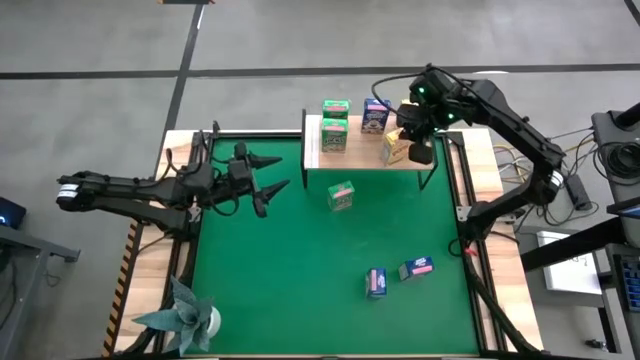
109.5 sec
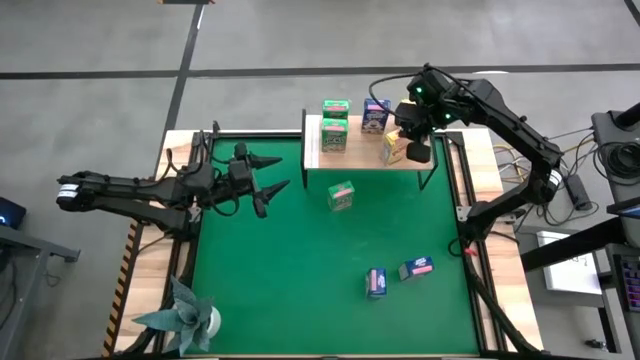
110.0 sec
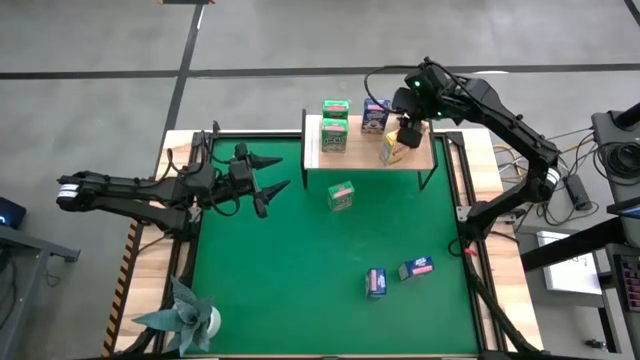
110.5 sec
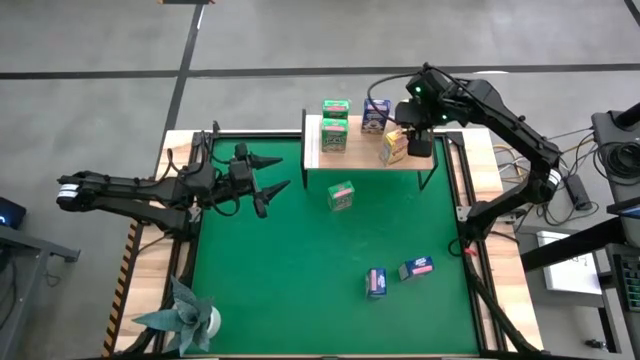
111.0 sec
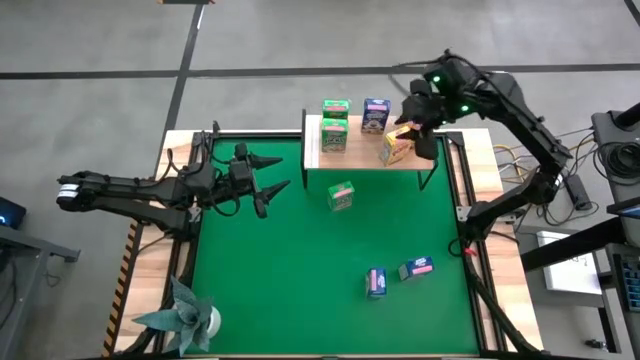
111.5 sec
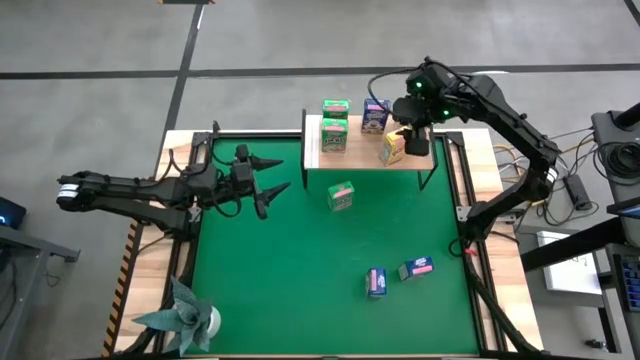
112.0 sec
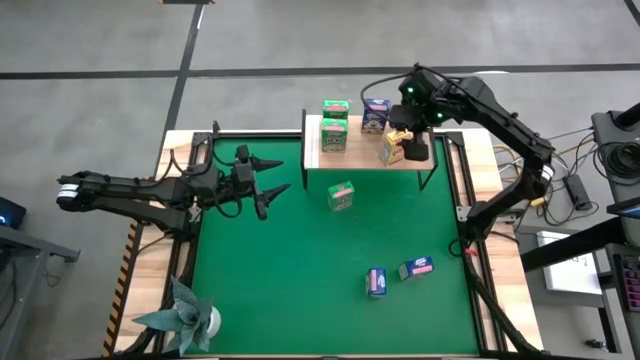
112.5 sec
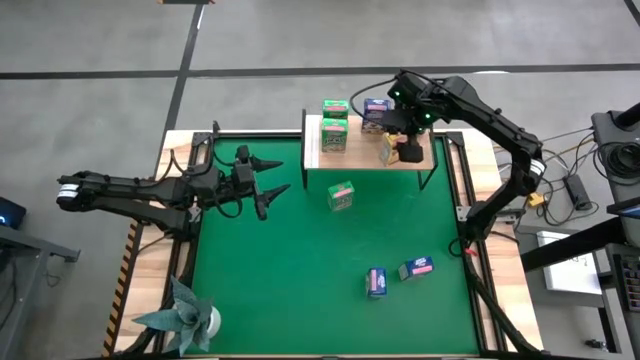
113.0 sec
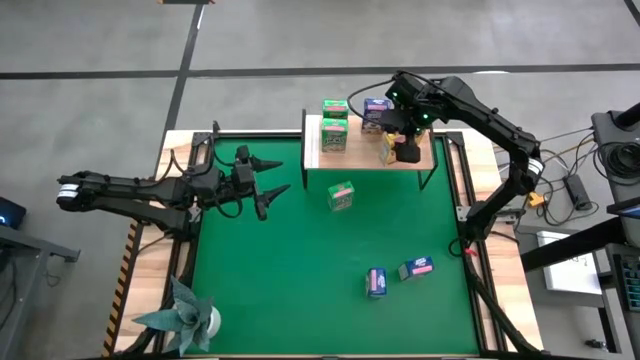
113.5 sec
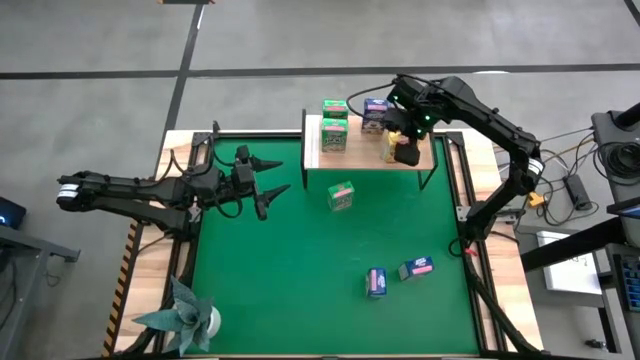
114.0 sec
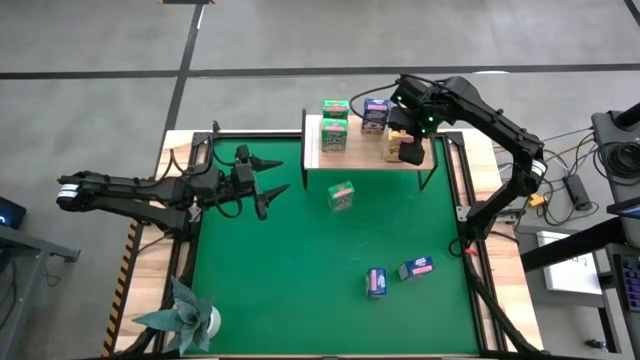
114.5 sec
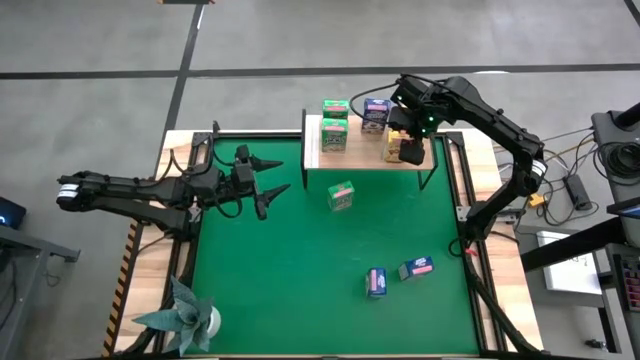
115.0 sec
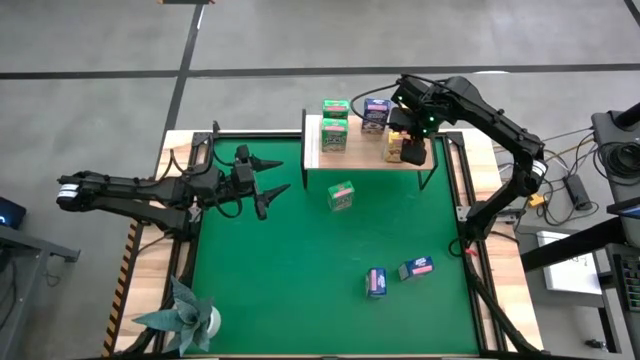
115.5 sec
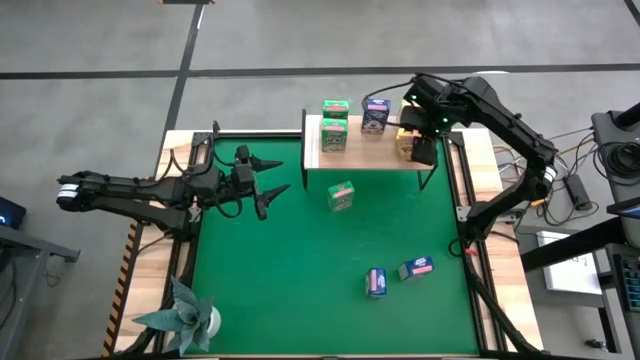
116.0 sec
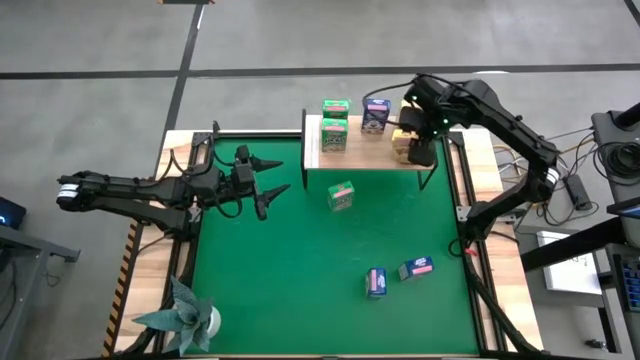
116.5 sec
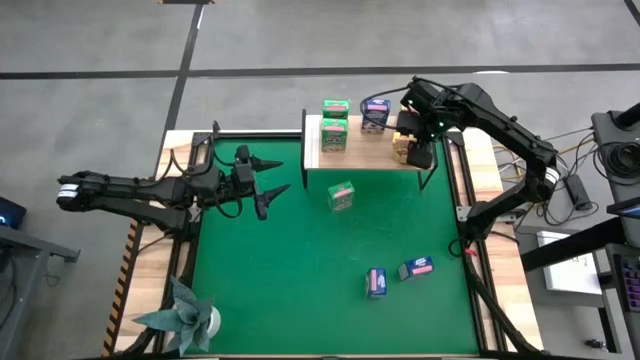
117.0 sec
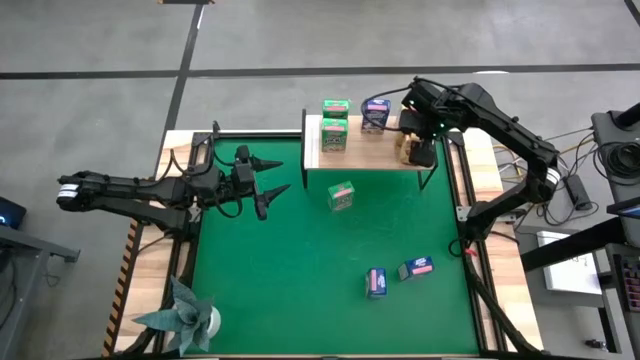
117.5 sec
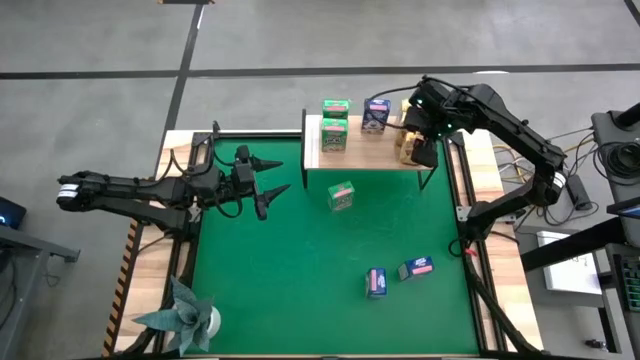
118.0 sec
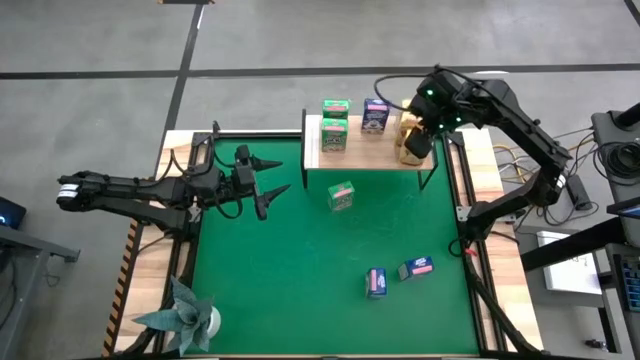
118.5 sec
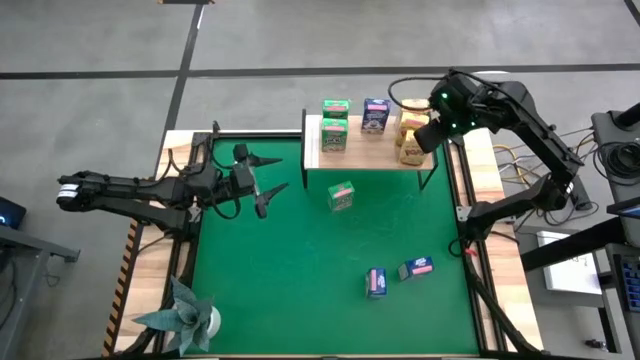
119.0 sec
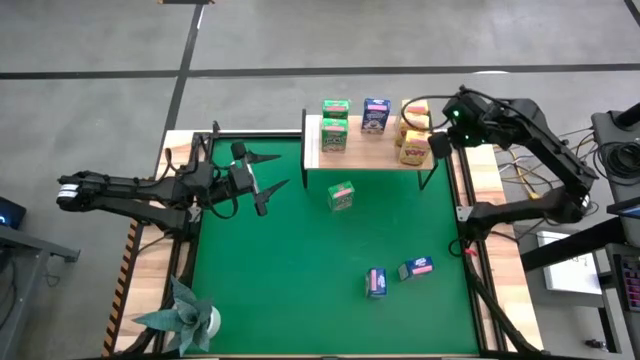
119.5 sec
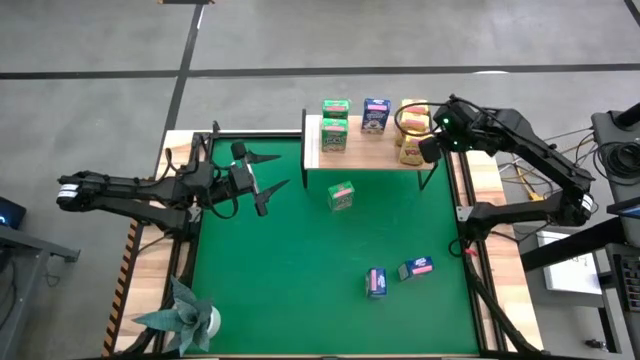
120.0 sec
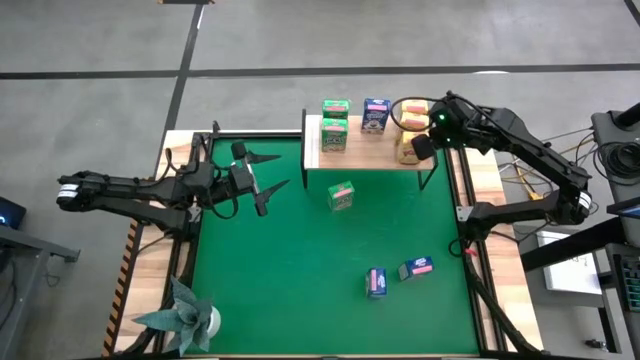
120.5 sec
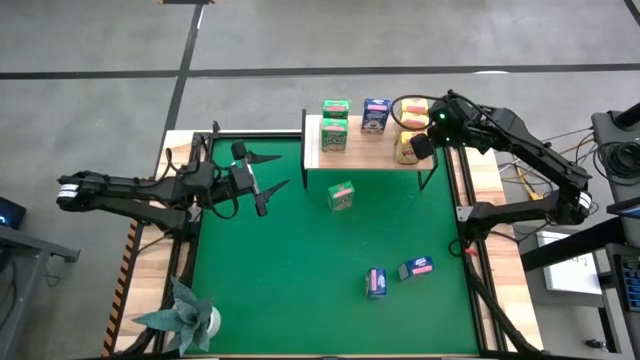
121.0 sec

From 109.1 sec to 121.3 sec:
Task: Stack cereal on shelf
Put the yellow cereal box on the shelf aligned with the other yellow cereal box

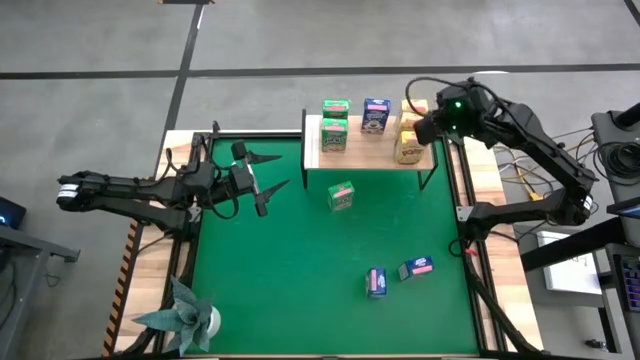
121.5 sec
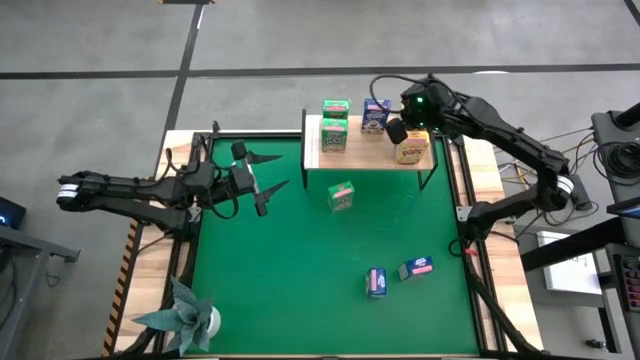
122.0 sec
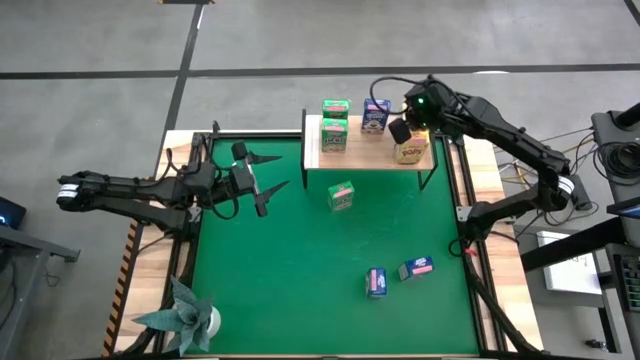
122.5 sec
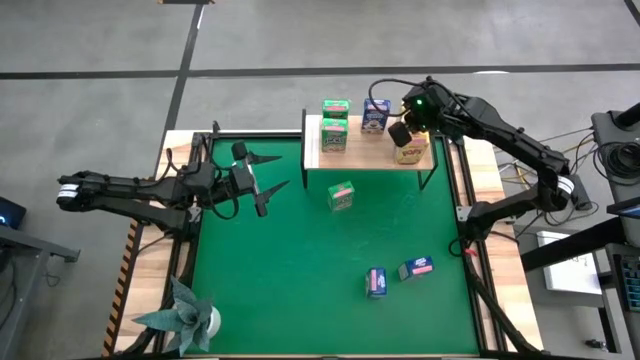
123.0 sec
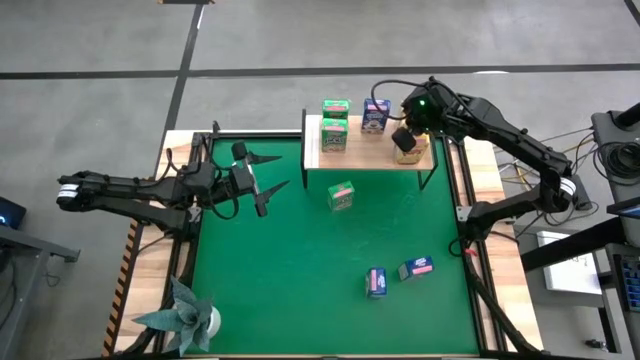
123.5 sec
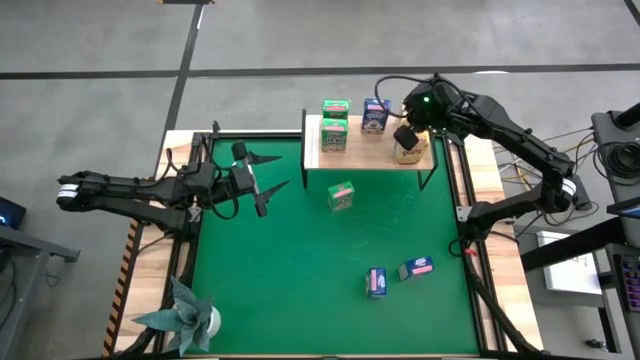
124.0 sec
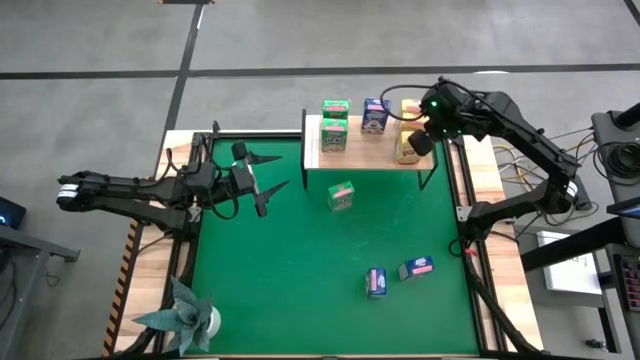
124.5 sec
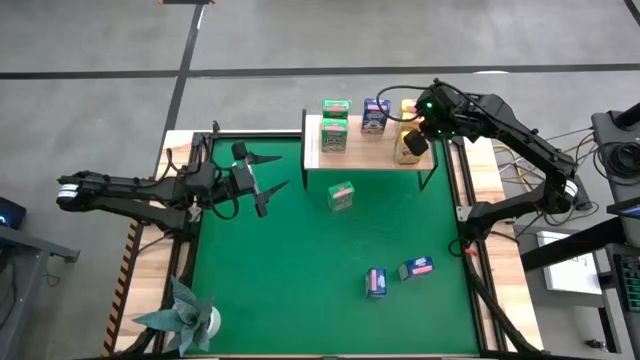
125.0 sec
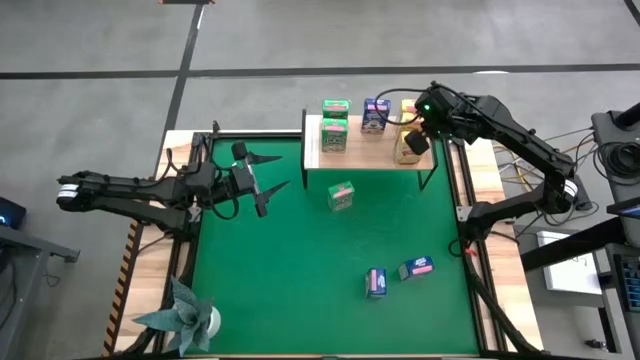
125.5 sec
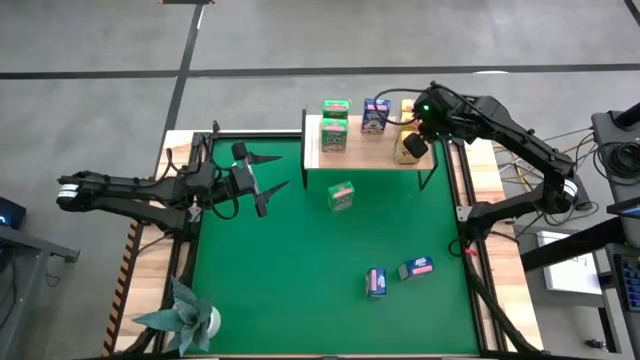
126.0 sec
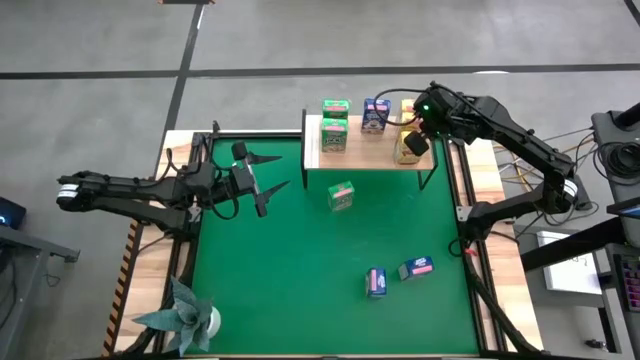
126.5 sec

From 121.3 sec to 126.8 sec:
Adjust the yellow cereal box

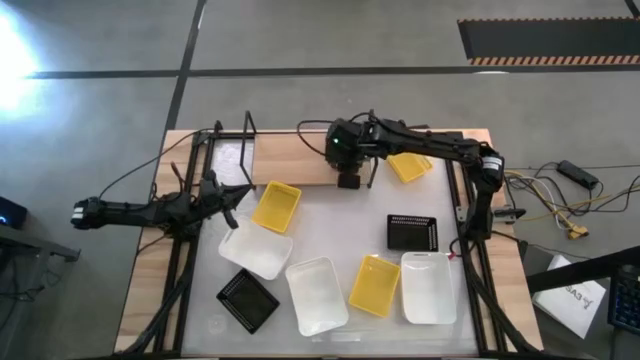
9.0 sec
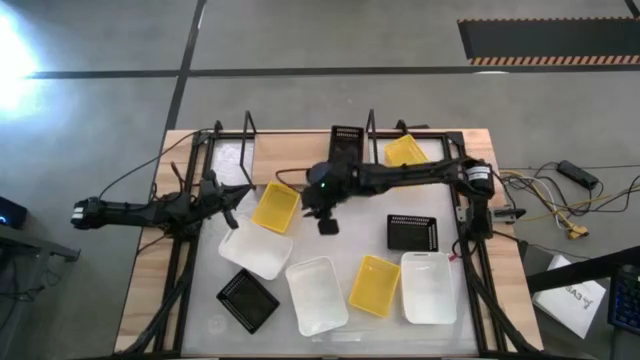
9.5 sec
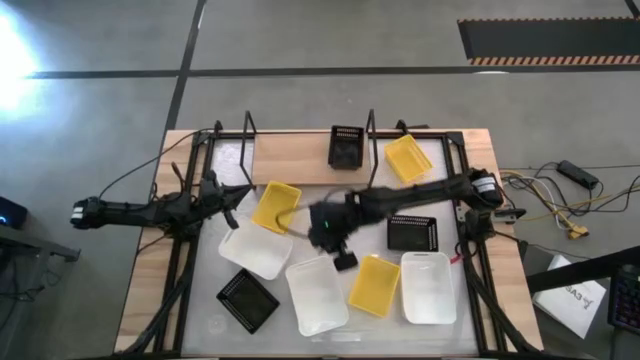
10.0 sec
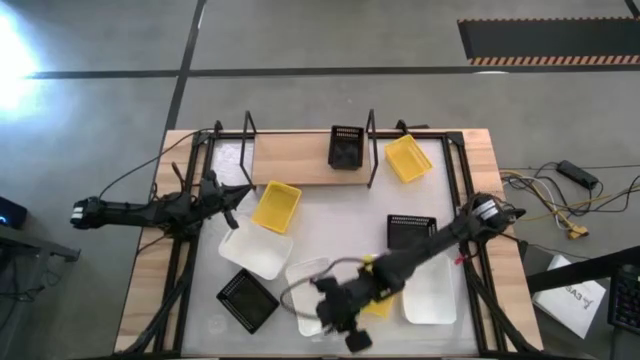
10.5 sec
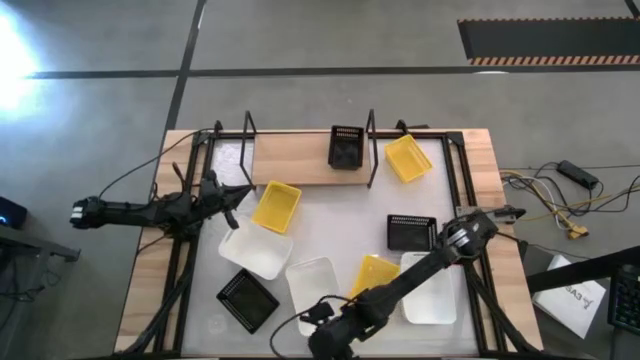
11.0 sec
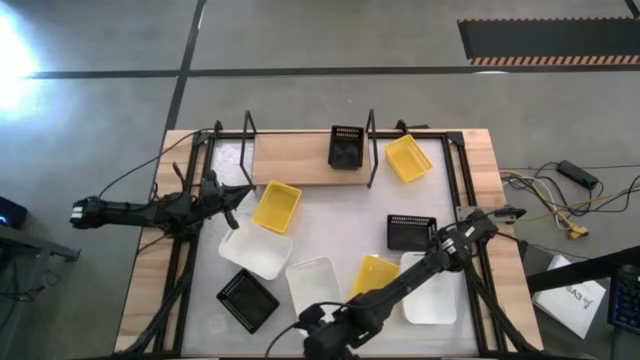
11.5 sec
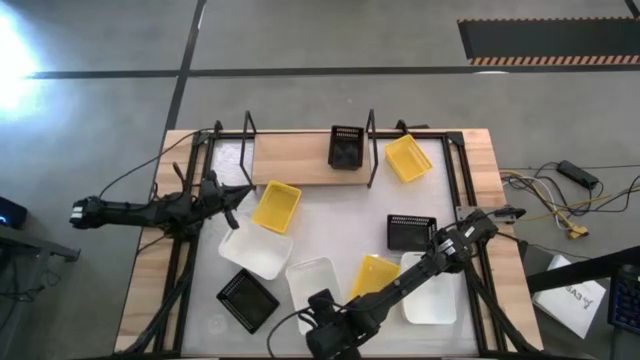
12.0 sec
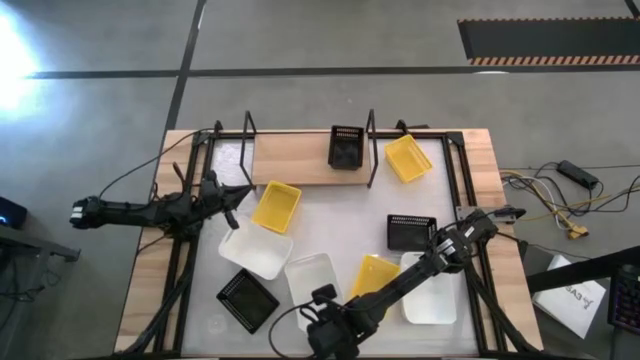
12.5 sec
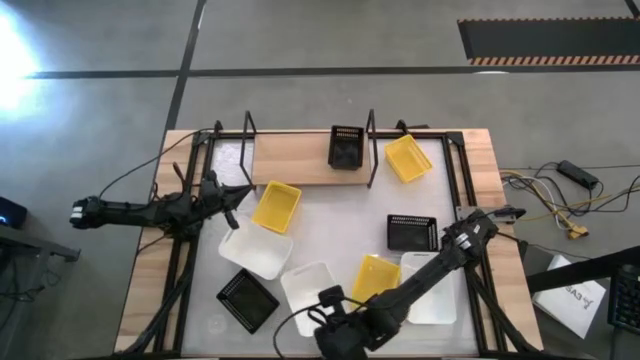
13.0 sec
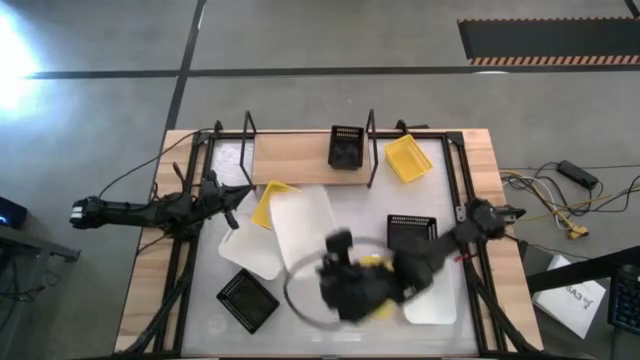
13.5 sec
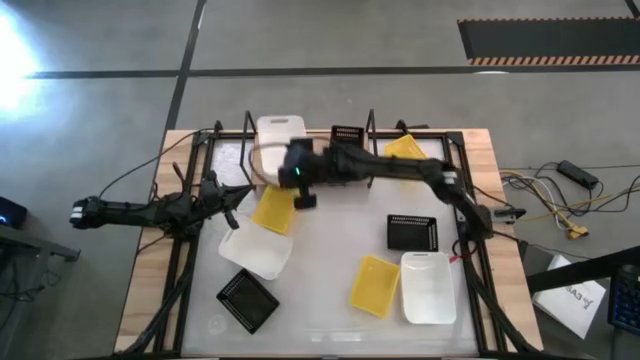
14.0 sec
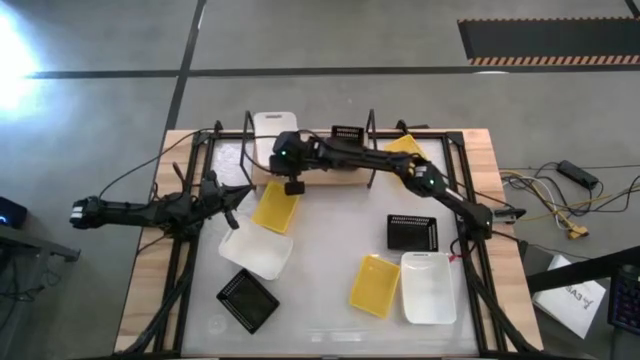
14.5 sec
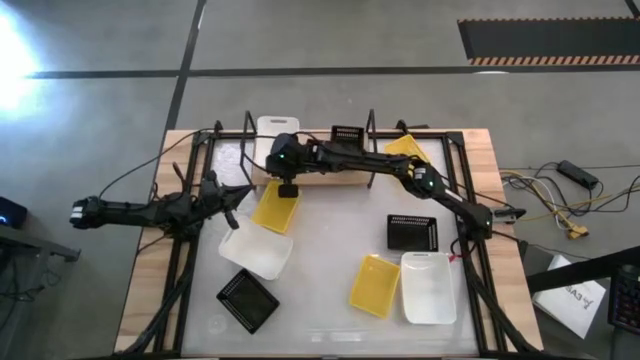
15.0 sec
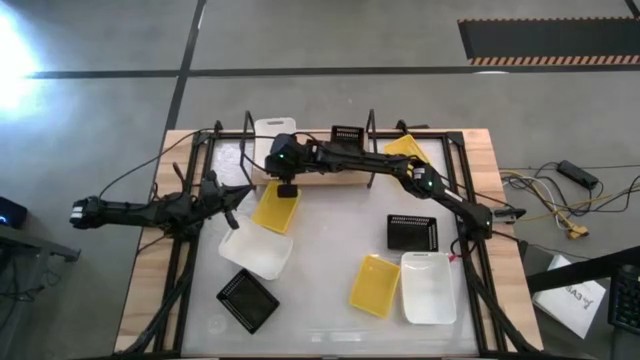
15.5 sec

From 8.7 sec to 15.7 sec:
Task: Stack baskets on shelf by color
Put the bottom left white bin on the shelf
